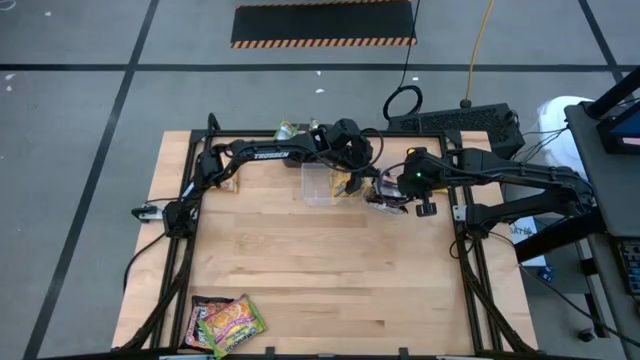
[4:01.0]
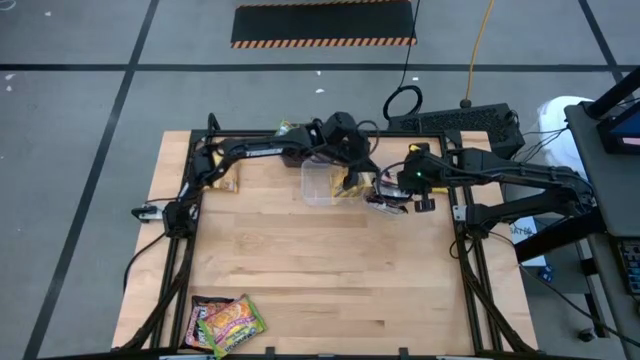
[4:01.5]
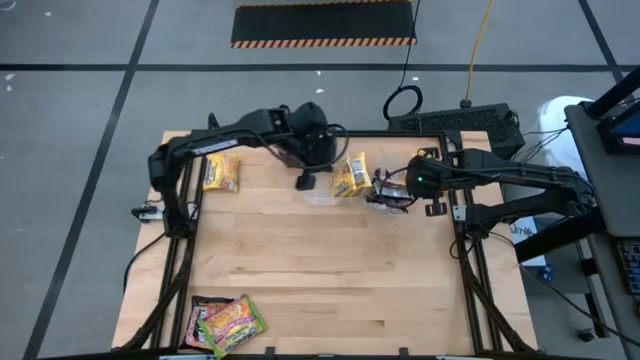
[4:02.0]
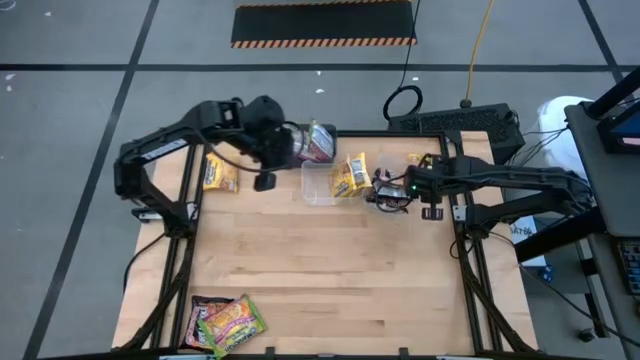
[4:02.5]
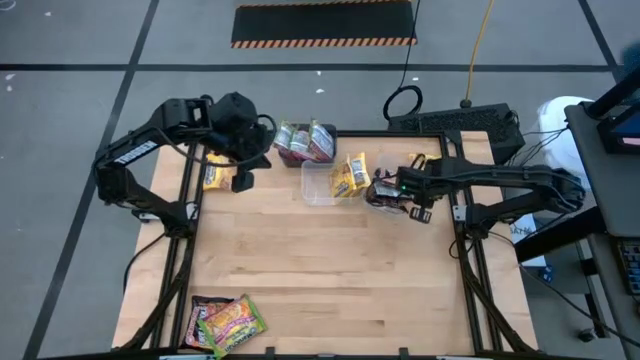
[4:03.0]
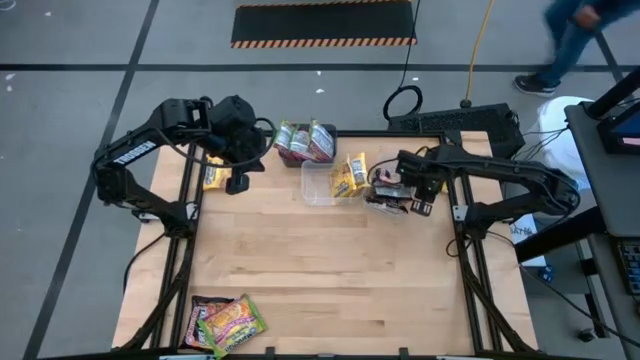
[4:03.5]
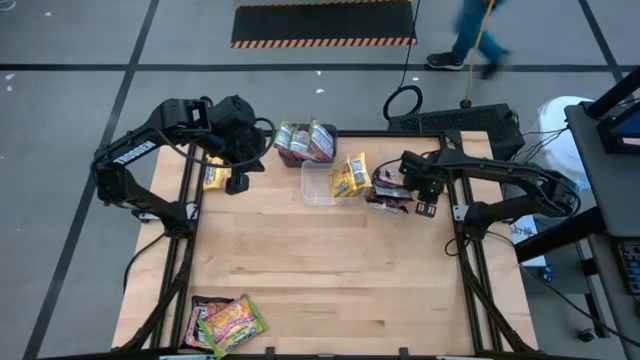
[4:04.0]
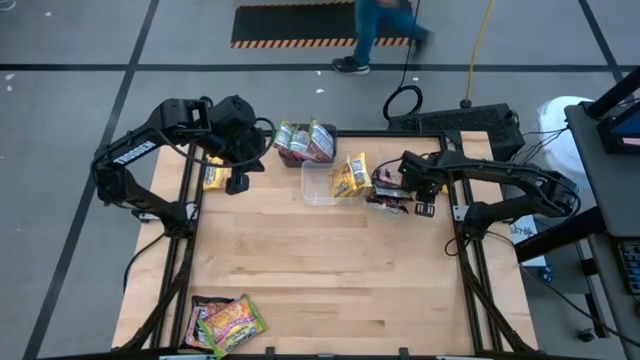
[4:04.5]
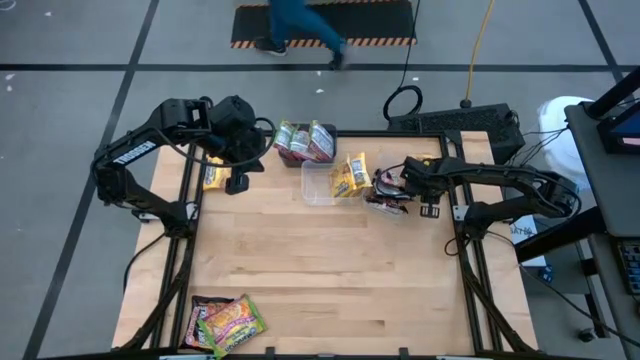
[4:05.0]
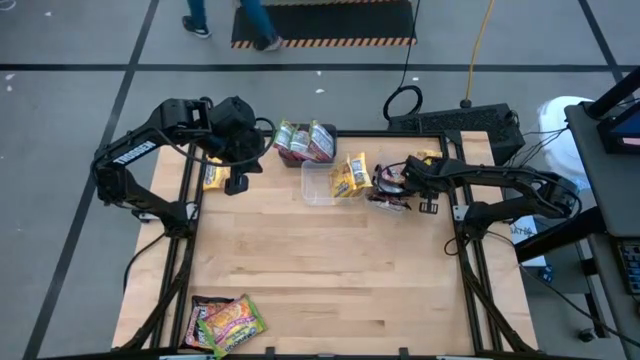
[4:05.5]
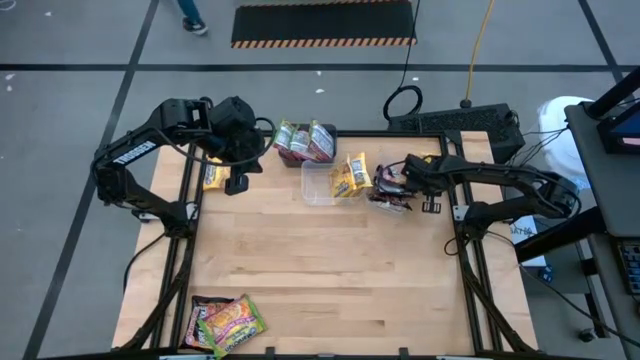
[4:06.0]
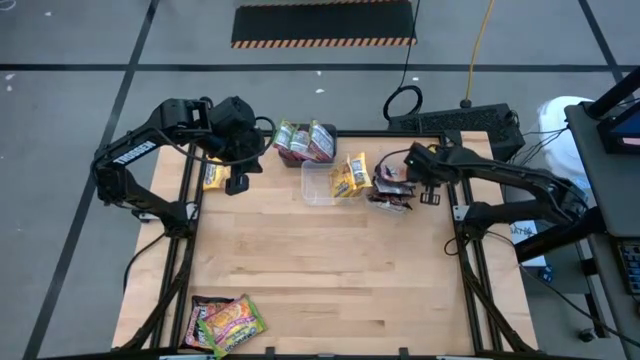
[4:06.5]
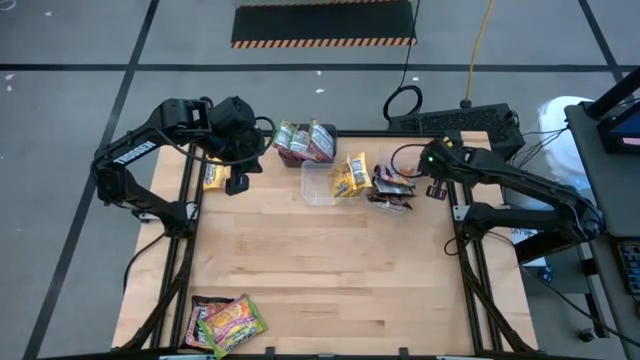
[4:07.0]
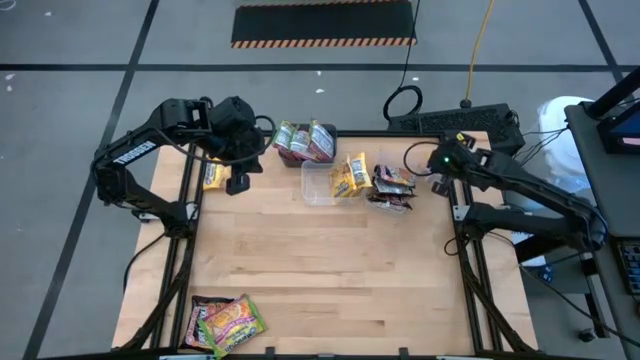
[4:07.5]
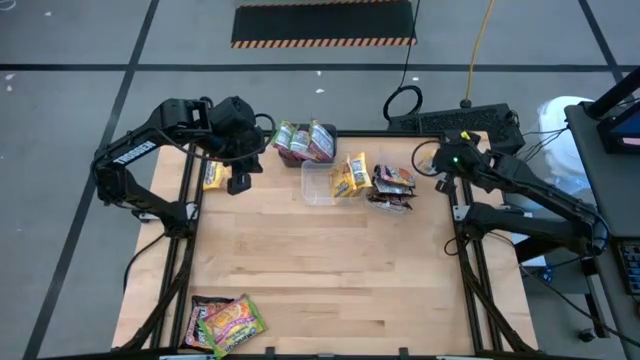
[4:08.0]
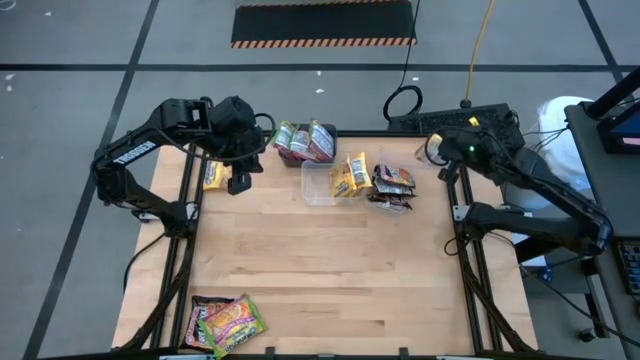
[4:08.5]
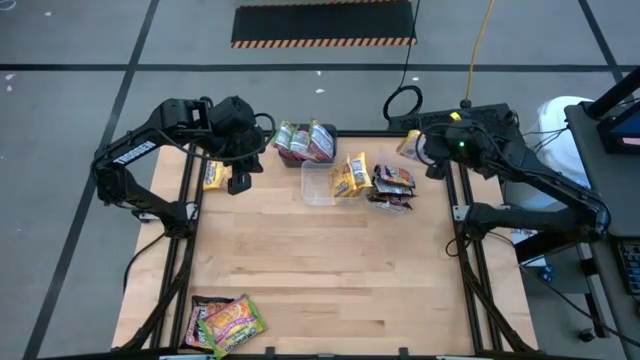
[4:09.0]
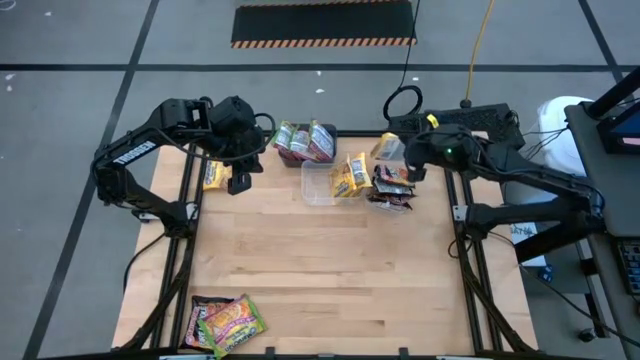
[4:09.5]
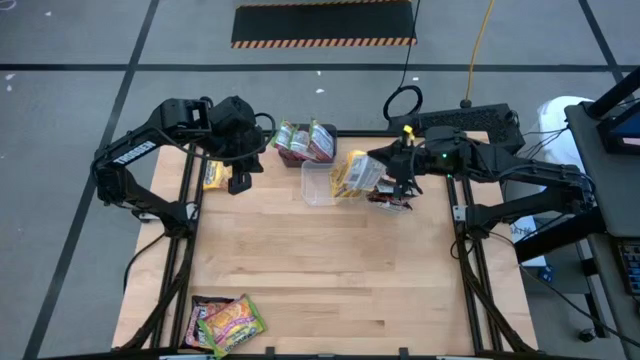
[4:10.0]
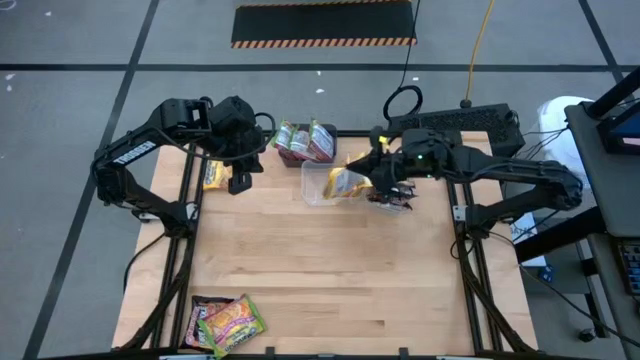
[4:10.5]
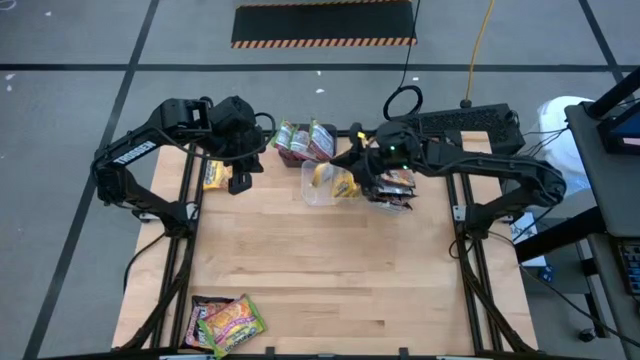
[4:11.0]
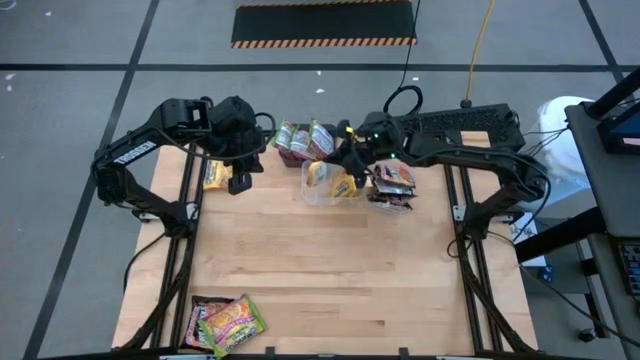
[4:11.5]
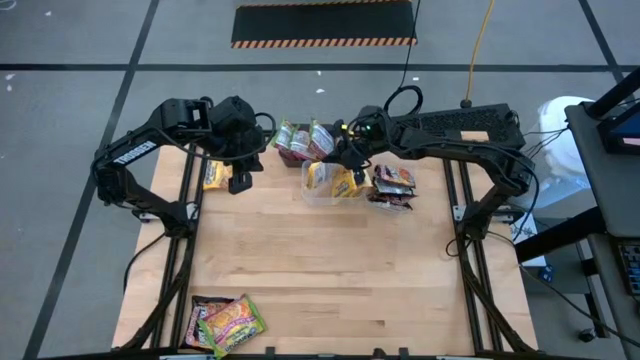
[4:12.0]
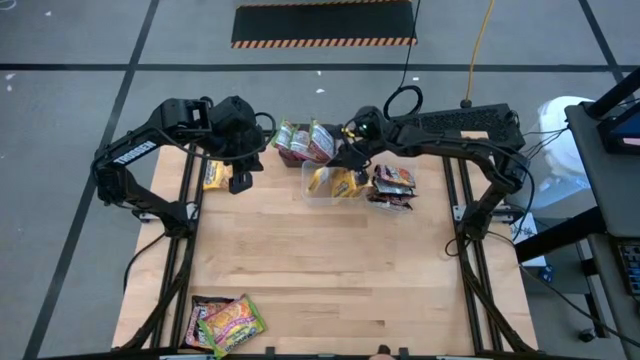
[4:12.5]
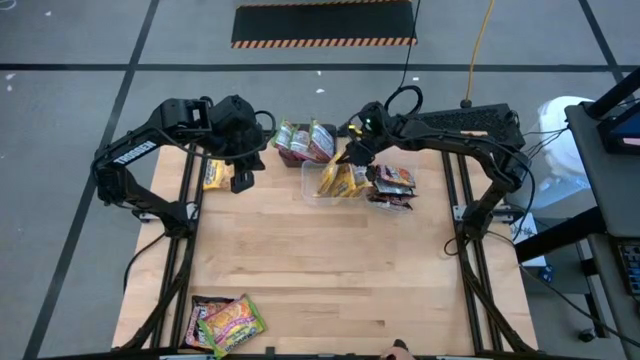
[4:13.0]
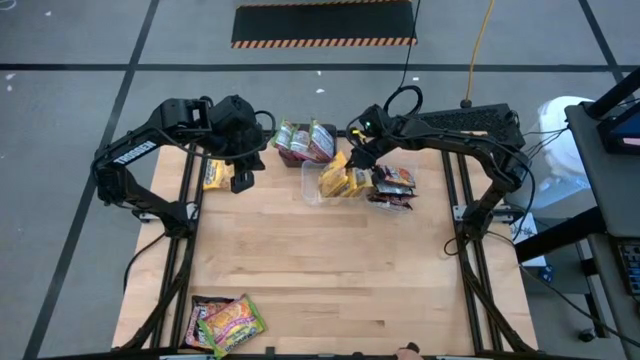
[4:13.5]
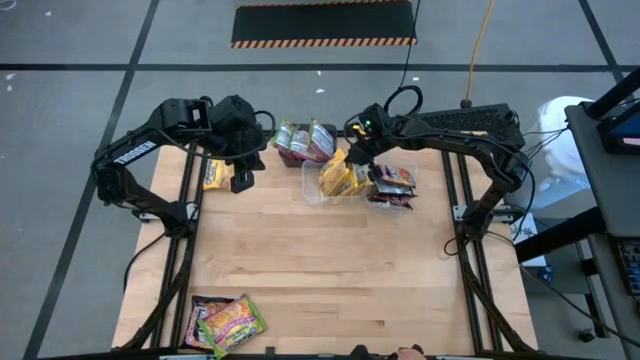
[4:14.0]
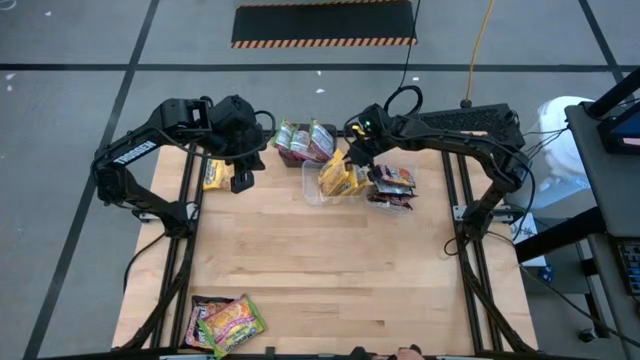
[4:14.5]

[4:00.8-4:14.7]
Task: Sort Maruchan noodles
Put the yellow noodle pack into the left transparent bin

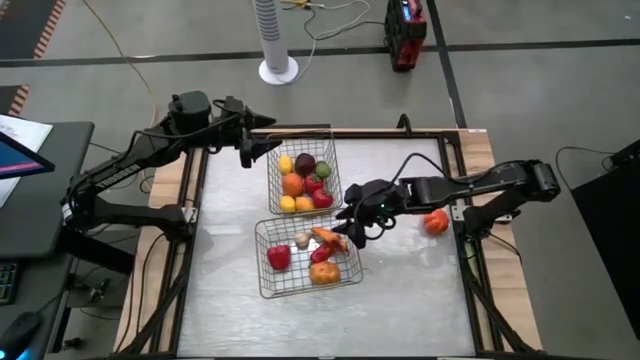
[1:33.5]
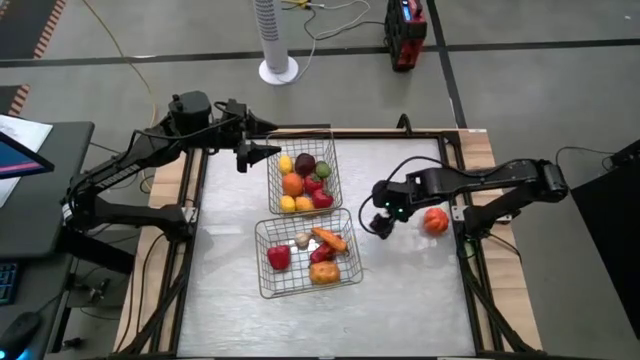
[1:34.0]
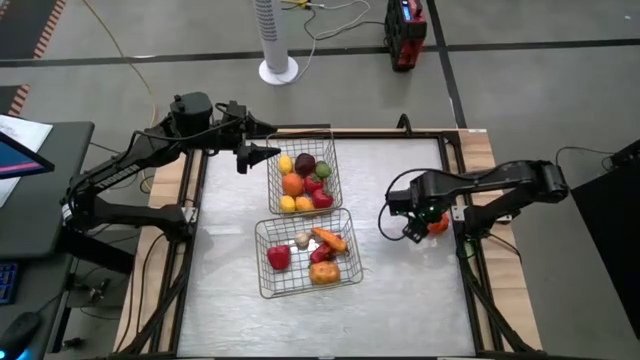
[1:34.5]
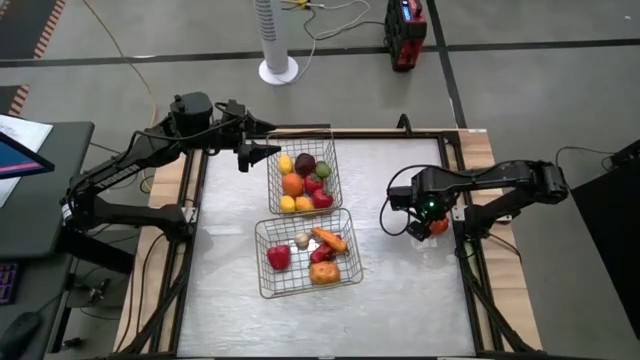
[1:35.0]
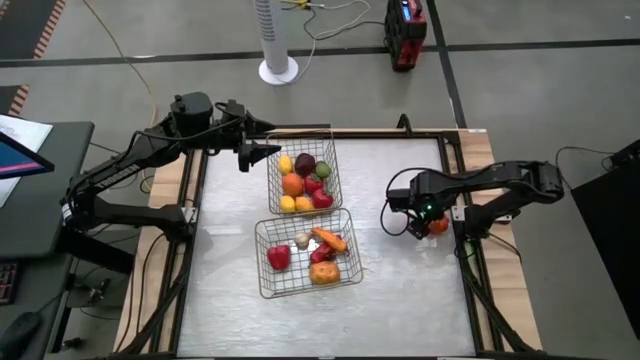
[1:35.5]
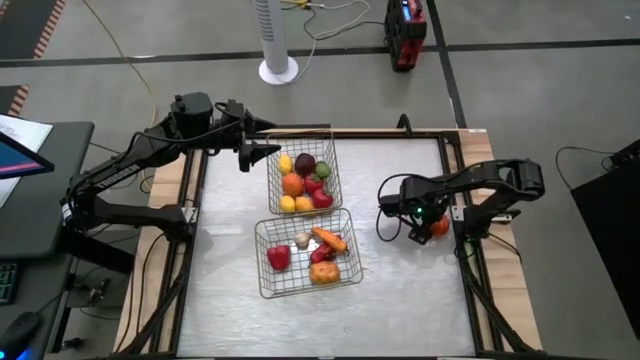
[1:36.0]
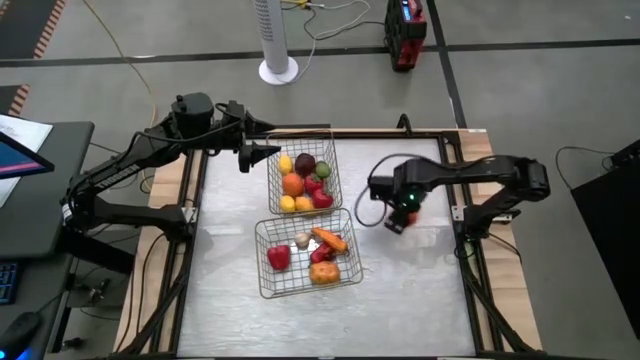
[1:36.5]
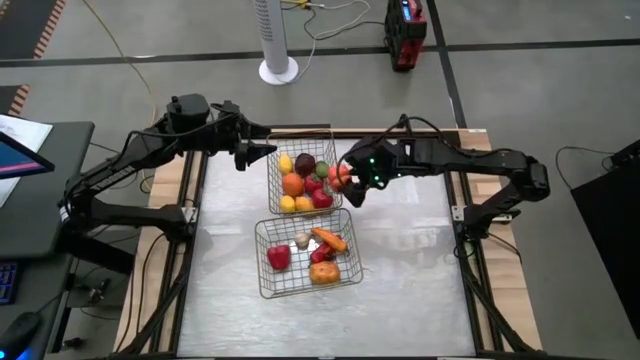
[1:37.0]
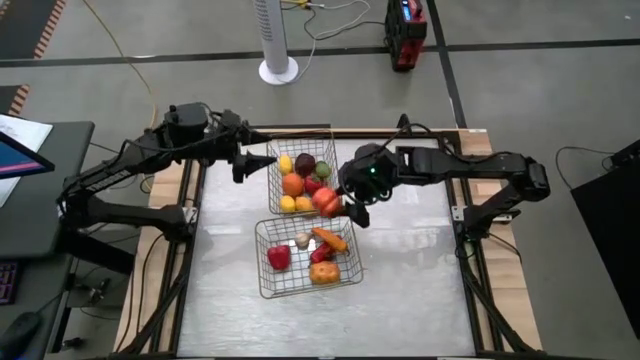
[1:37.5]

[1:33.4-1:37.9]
Task: Sort produce into baskets
Put the orange pumpkin into the bottom wire basket
